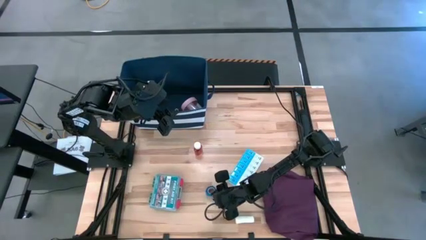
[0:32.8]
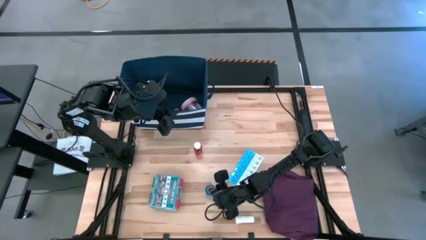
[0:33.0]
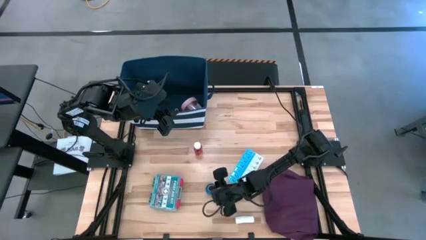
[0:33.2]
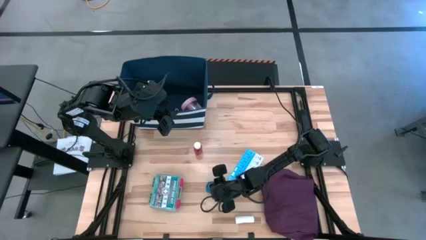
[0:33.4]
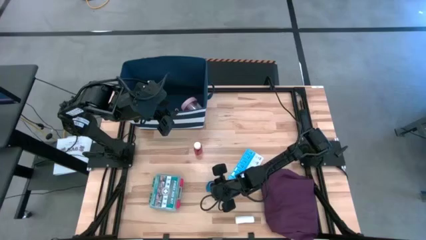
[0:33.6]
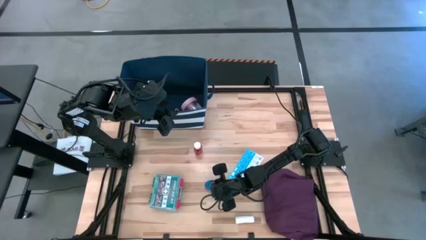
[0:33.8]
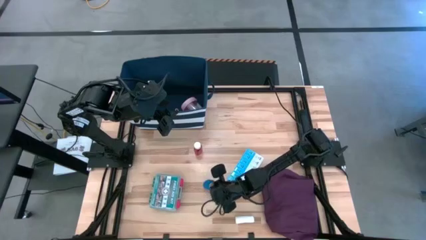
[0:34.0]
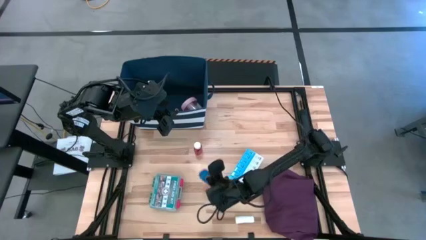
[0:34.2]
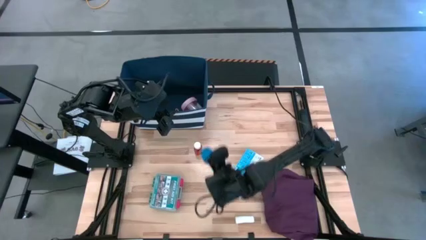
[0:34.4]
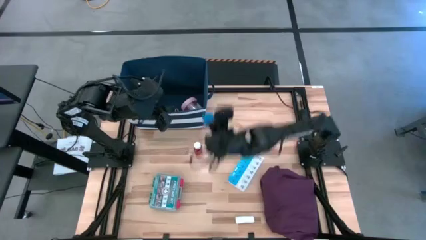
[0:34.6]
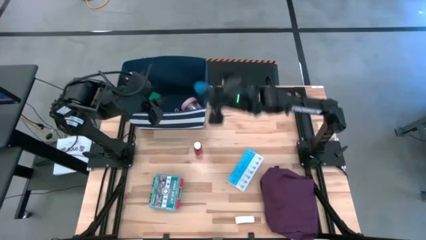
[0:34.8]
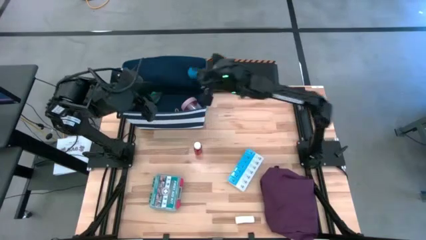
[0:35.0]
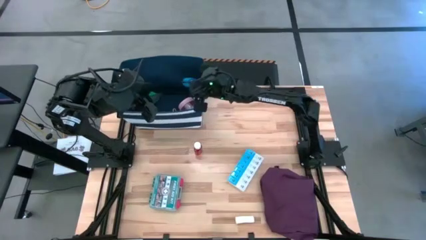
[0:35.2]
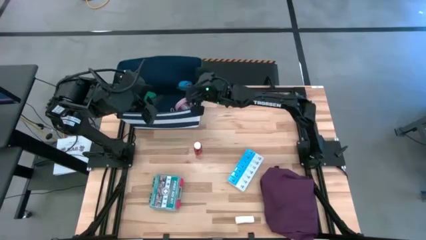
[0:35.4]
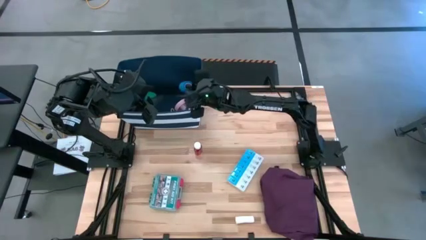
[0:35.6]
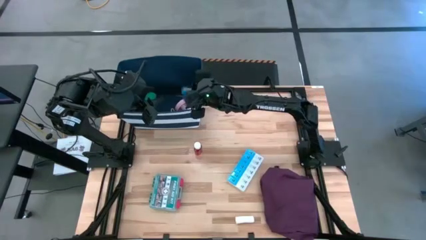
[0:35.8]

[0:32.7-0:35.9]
Task: Pick & place medical supplies in basket/bin
Put the blue bandage into the blue bin

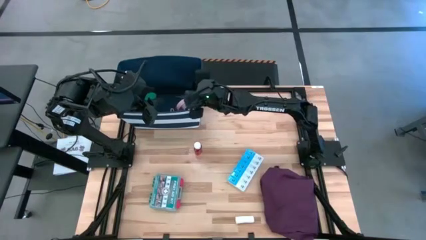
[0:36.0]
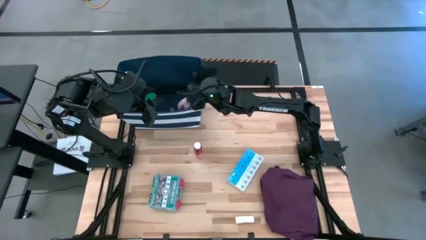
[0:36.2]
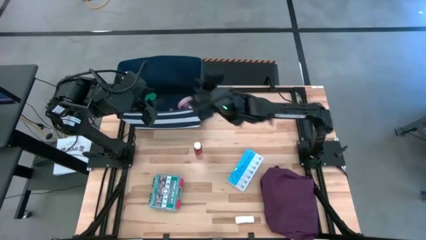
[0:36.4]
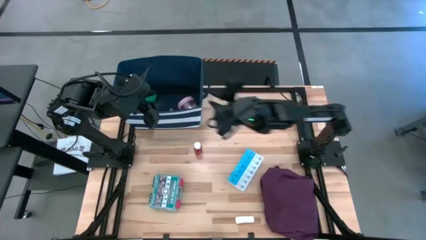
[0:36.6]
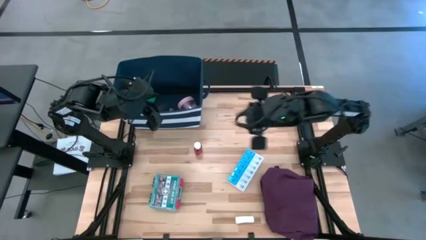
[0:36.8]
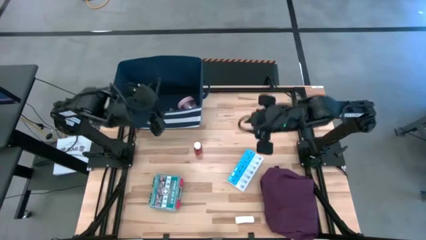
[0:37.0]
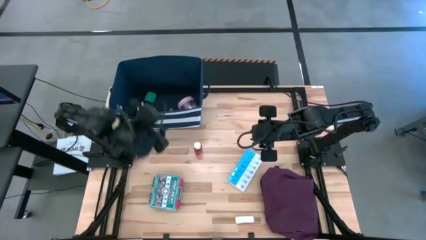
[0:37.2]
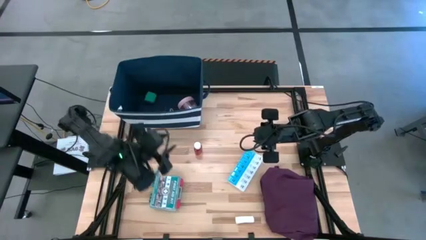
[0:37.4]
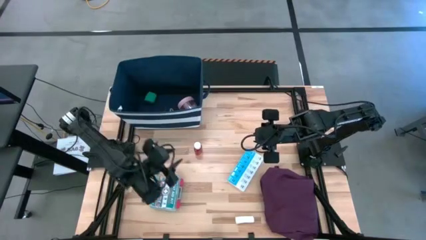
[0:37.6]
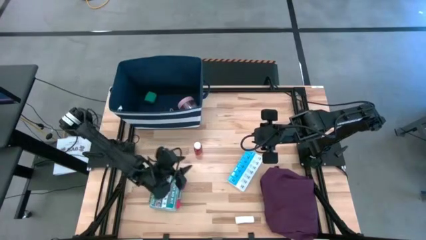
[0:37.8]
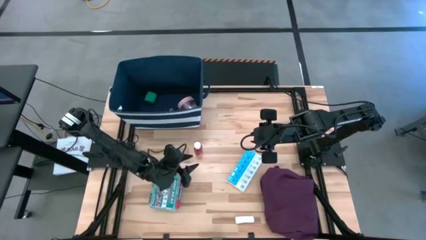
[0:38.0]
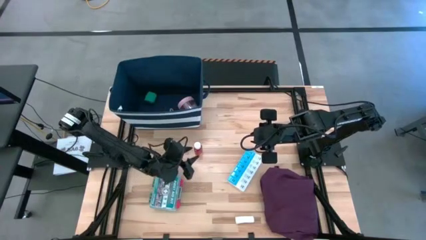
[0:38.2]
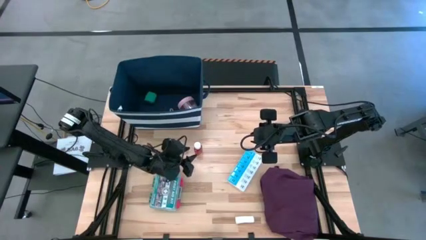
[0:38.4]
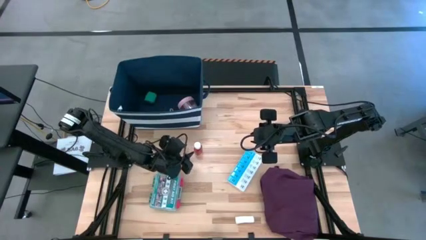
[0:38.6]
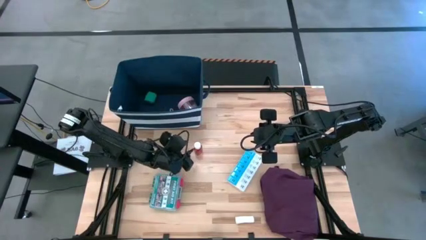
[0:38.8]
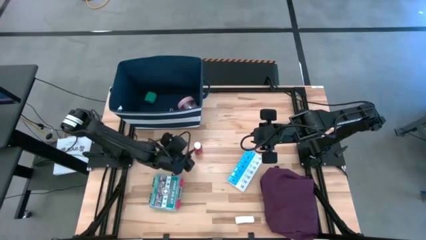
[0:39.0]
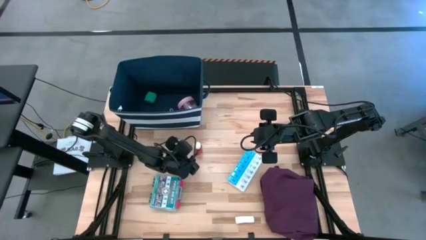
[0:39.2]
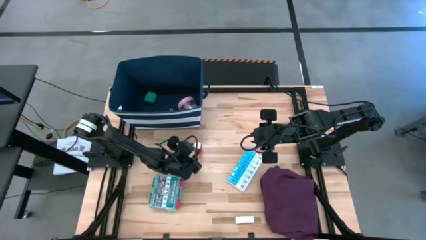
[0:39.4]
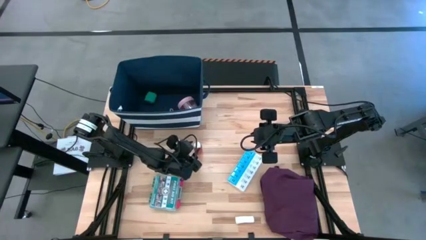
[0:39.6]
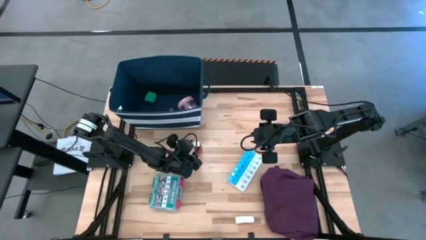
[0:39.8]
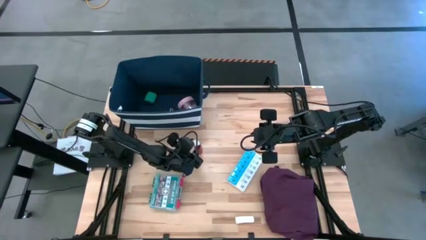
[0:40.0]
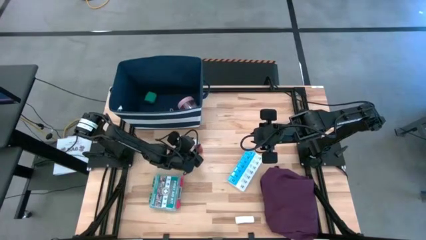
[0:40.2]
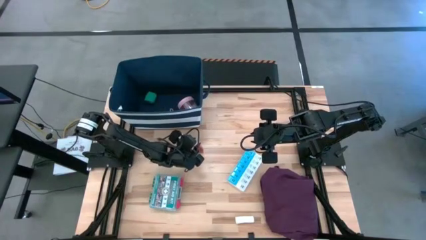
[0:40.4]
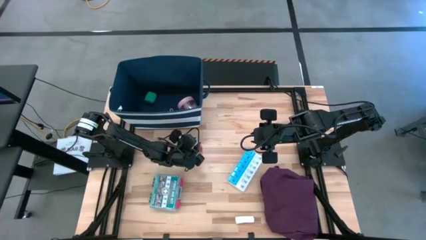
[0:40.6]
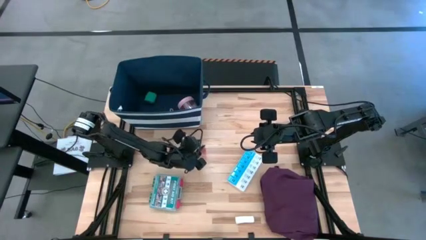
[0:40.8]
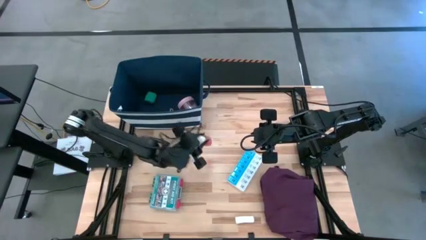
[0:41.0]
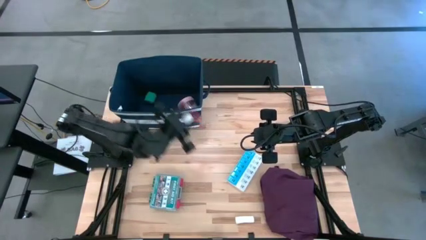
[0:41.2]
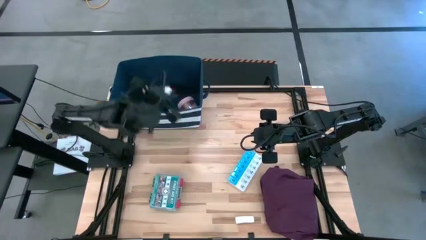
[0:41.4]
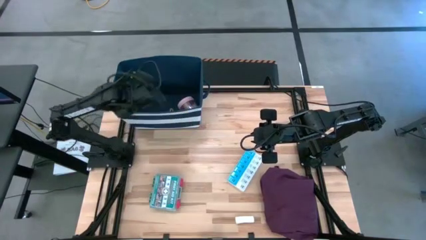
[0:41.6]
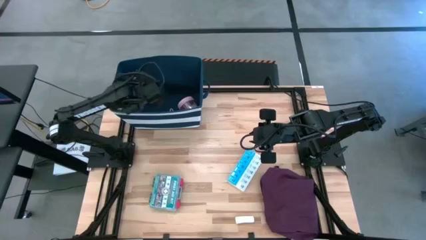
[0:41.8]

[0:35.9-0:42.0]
Put the orange pill bottle into the blue bin

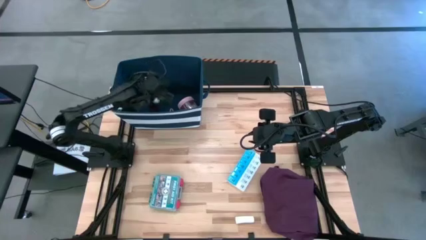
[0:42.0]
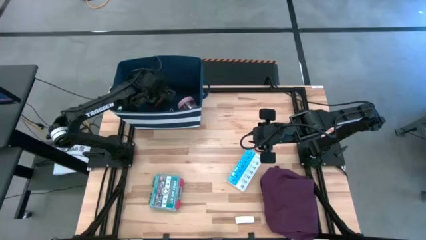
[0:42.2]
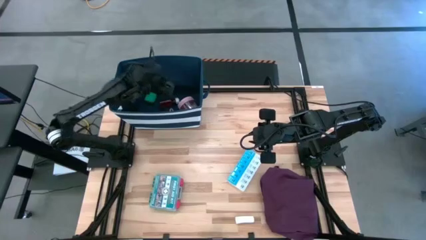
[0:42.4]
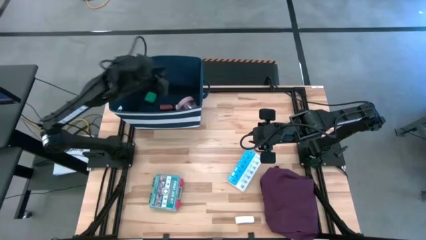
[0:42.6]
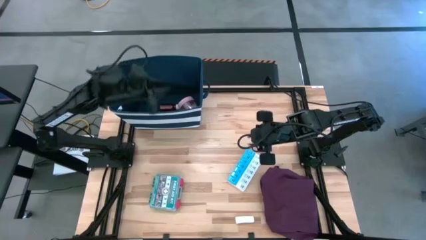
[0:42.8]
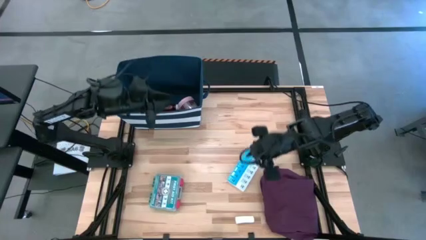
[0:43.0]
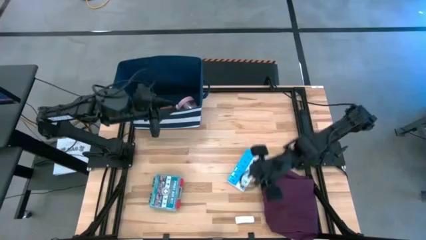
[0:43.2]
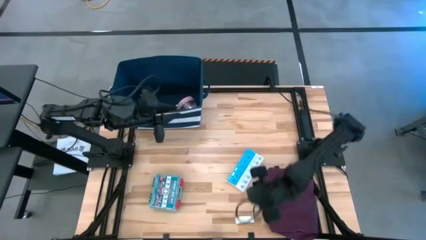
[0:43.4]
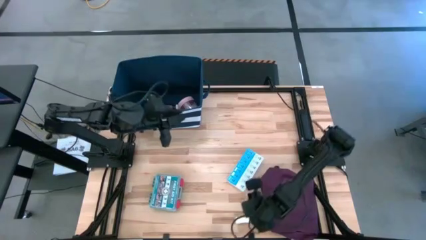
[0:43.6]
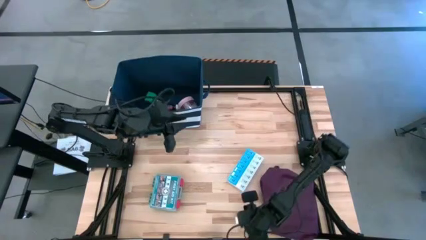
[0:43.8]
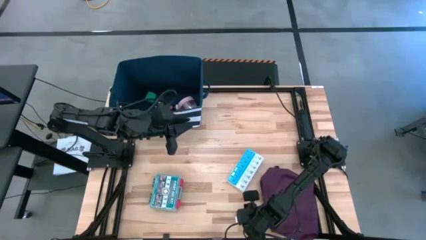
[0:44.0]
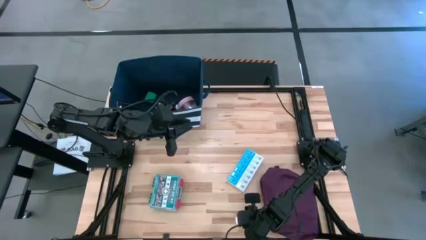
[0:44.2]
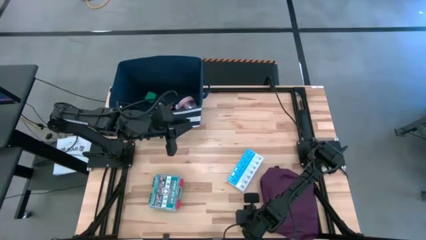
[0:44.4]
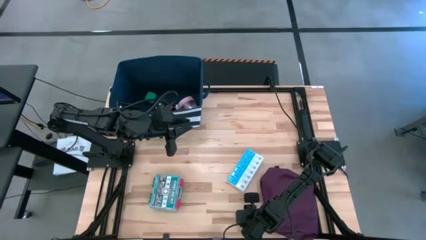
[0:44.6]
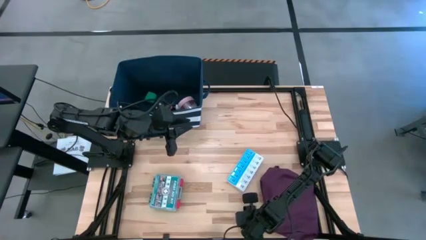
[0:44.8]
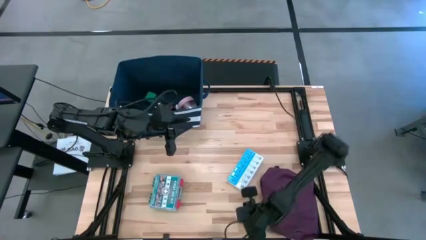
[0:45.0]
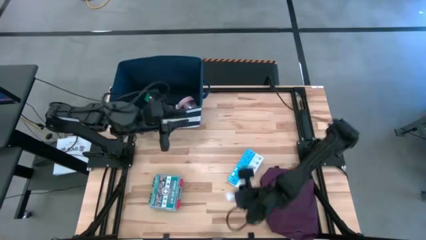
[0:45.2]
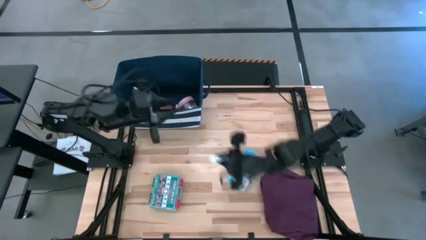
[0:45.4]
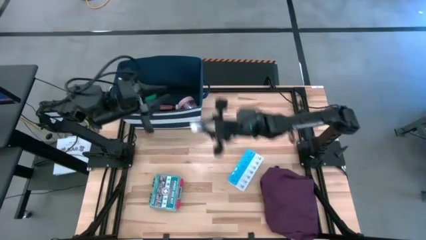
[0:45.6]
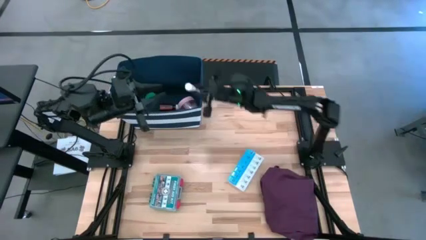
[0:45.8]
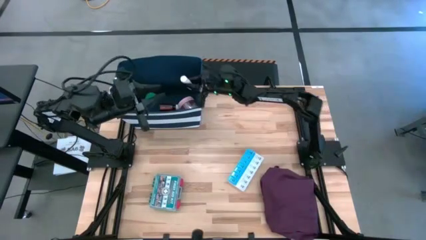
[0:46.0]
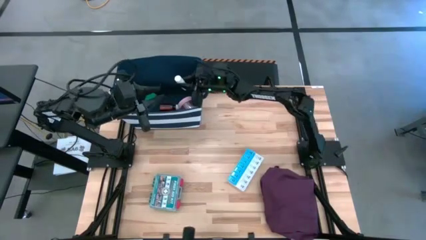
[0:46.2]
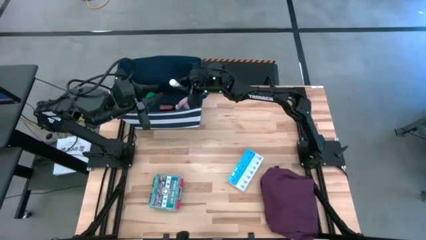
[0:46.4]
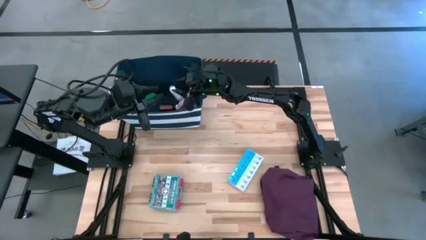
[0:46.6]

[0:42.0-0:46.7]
Put the white gauze into the blue bin

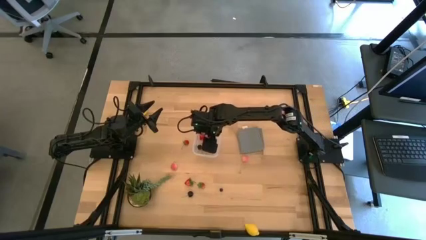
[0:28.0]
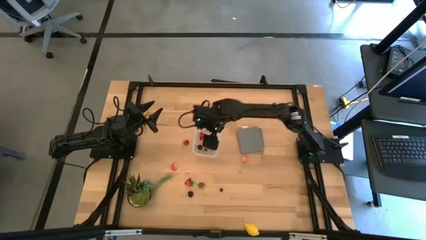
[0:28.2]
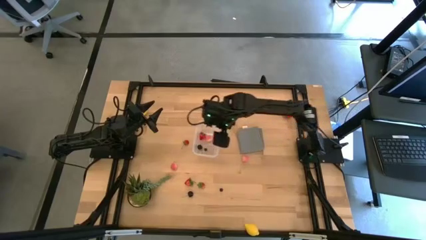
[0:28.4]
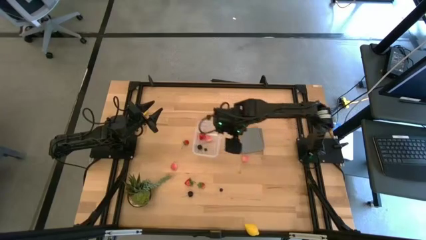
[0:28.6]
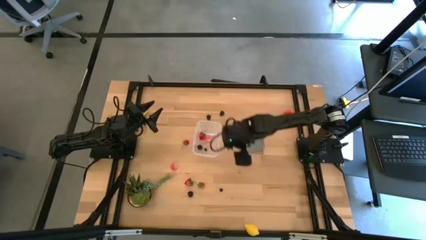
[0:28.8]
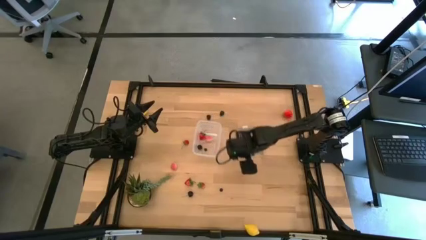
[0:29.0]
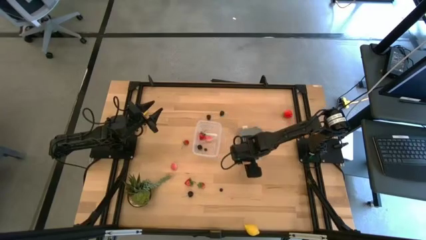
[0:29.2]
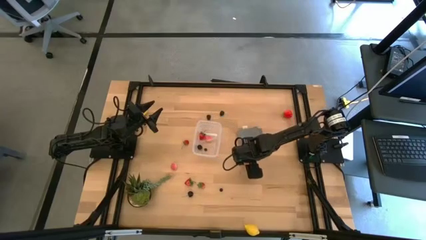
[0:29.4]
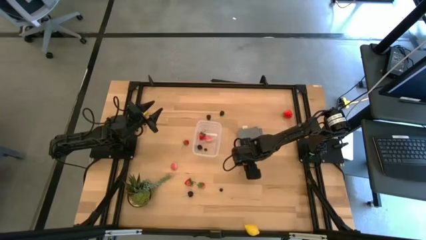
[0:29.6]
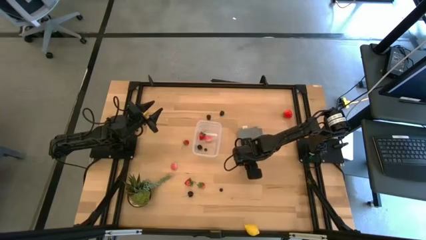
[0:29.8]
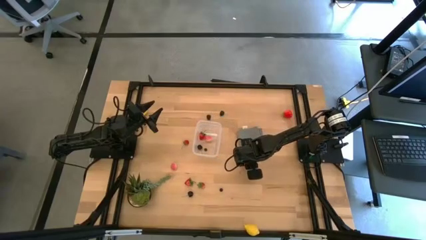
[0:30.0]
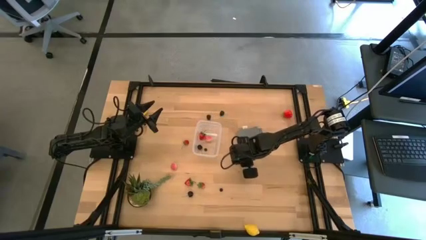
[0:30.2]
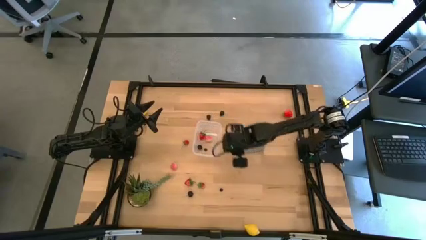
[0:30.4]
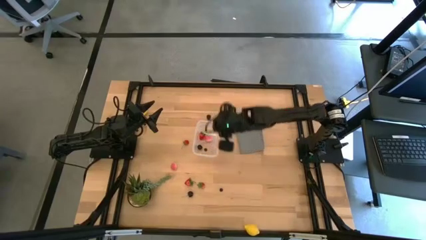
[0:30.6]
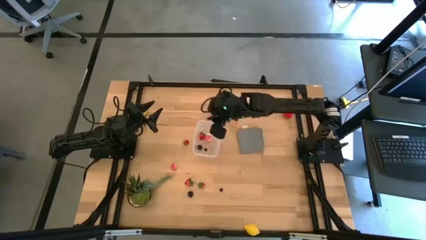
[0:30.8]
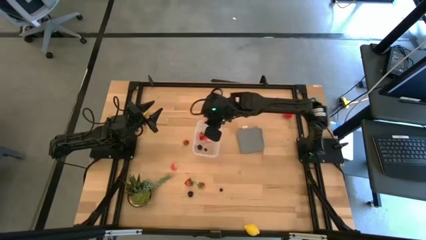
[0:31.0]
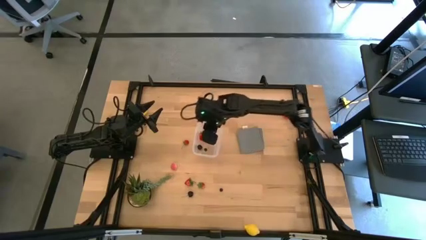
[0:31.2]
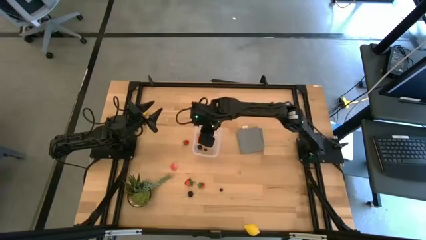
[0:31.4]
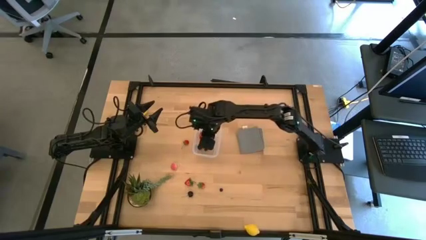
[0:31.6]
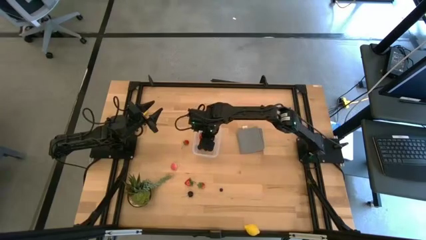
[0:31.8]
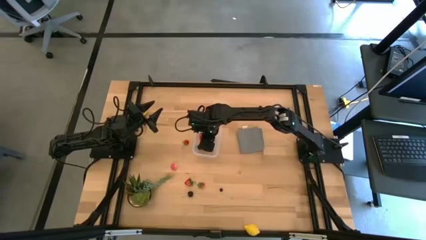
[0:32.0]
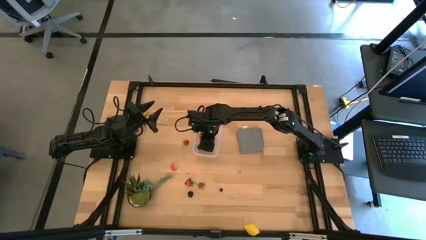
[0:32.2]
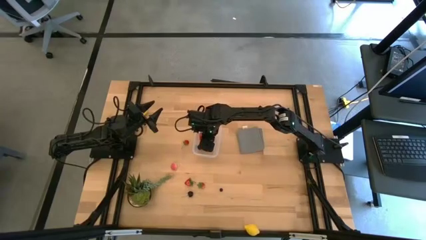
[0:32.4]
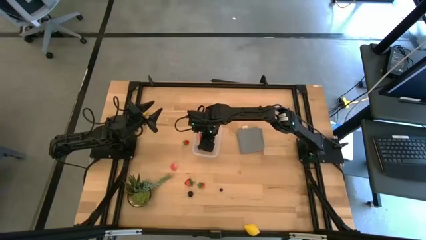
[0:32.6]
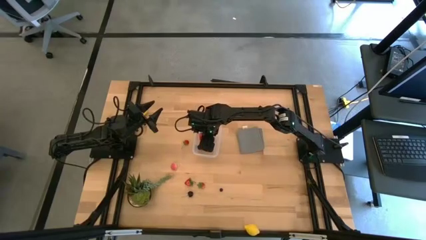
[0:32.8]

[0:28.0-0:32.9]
Task: Pick and placing Produce into tupperware
Put the peach into the transparent bin
